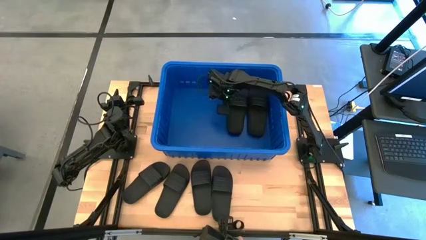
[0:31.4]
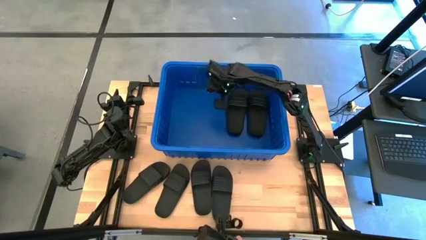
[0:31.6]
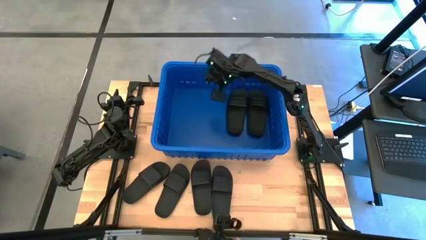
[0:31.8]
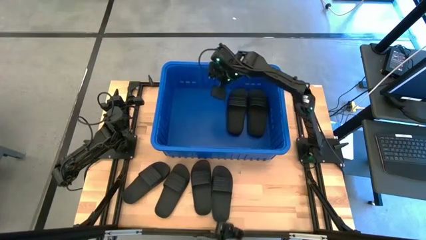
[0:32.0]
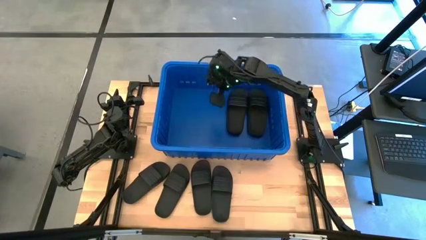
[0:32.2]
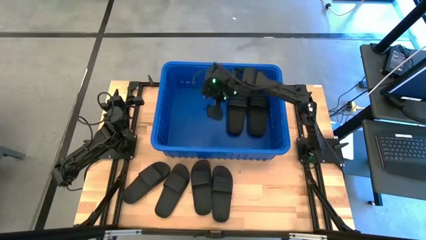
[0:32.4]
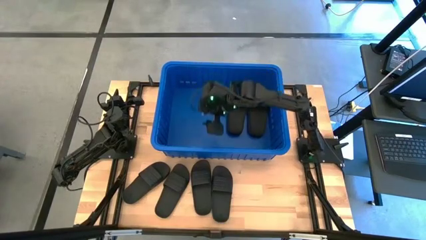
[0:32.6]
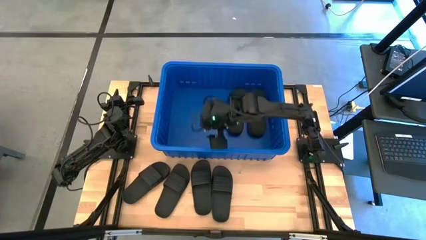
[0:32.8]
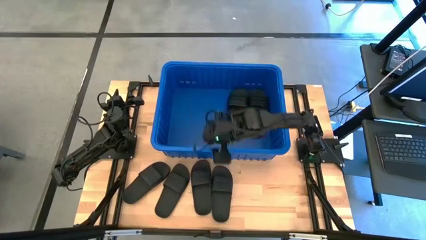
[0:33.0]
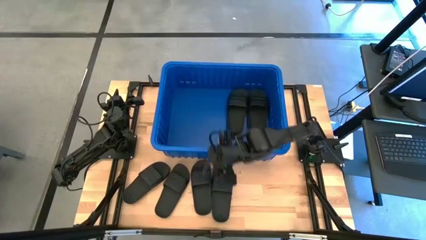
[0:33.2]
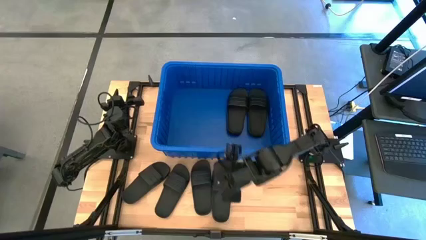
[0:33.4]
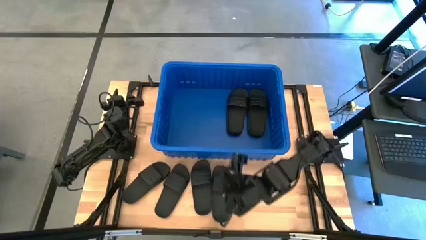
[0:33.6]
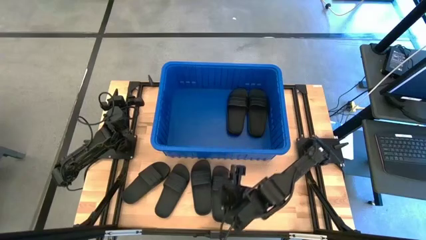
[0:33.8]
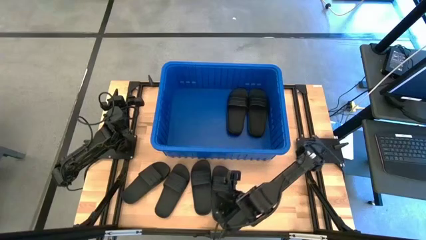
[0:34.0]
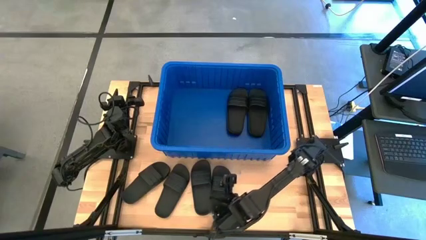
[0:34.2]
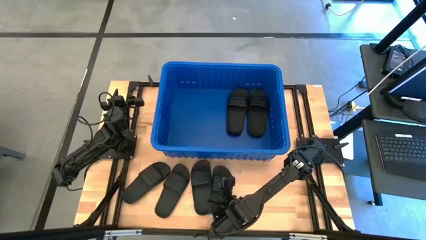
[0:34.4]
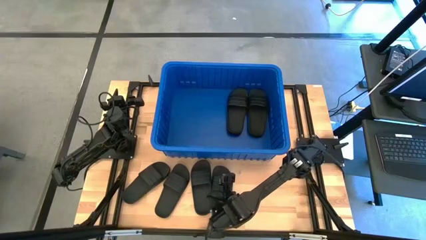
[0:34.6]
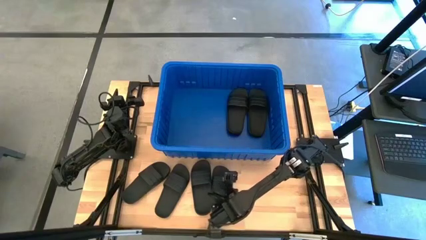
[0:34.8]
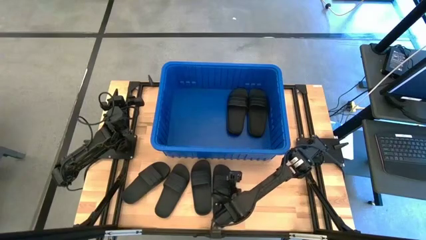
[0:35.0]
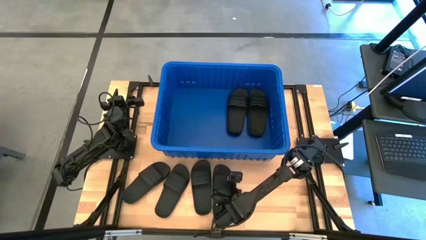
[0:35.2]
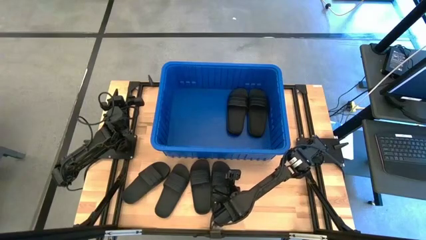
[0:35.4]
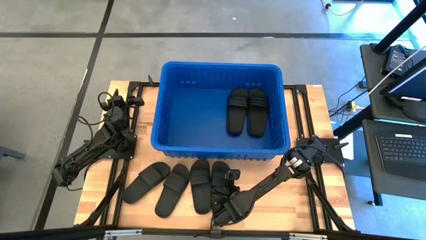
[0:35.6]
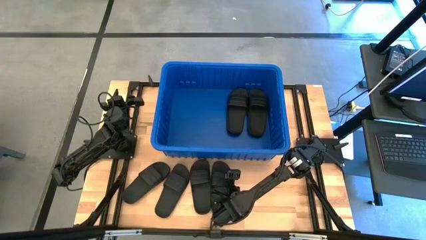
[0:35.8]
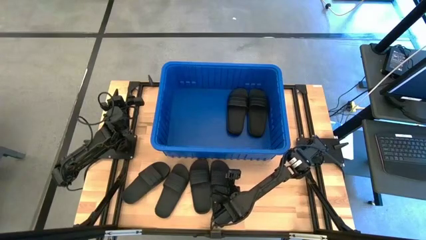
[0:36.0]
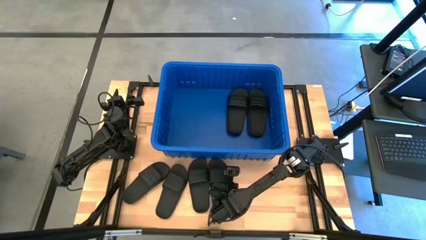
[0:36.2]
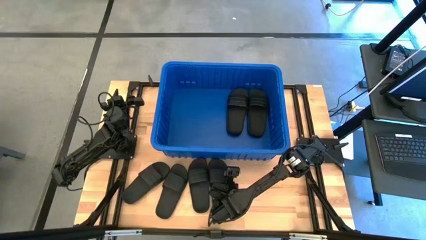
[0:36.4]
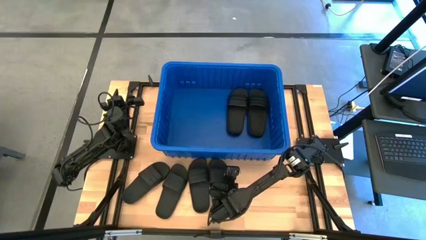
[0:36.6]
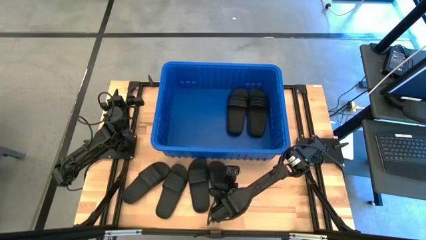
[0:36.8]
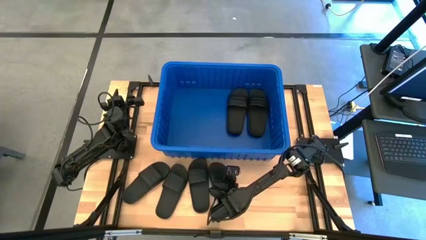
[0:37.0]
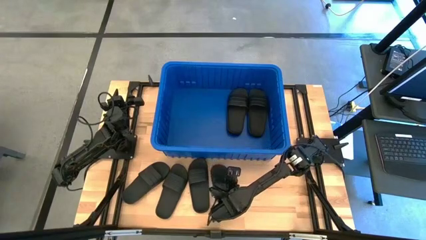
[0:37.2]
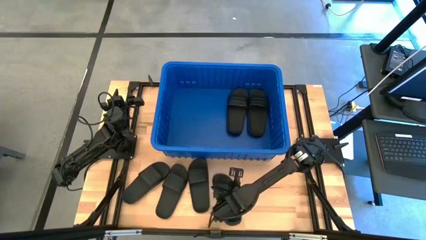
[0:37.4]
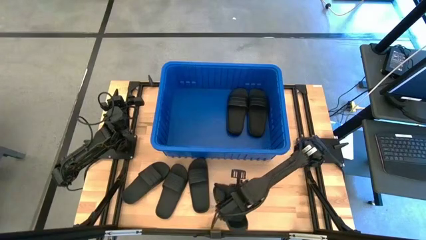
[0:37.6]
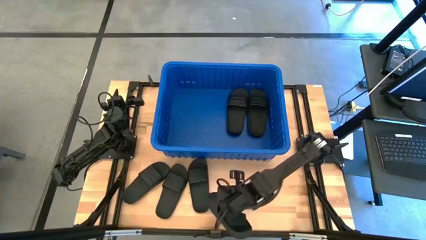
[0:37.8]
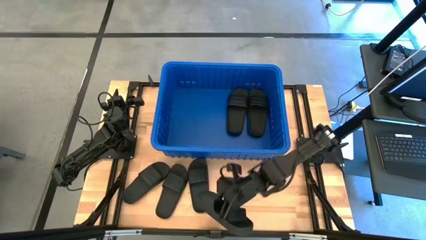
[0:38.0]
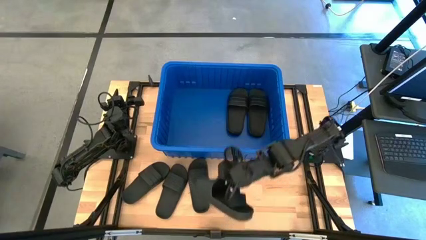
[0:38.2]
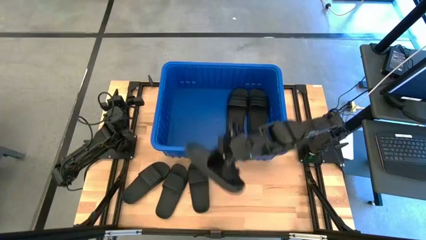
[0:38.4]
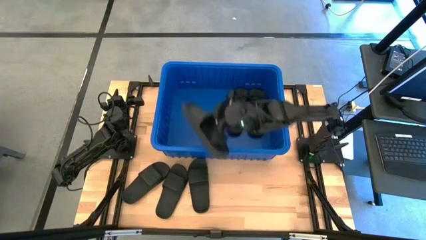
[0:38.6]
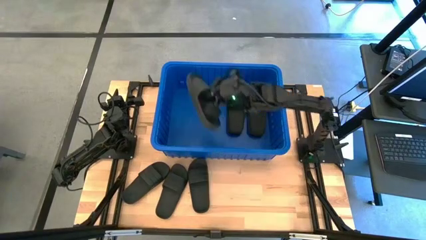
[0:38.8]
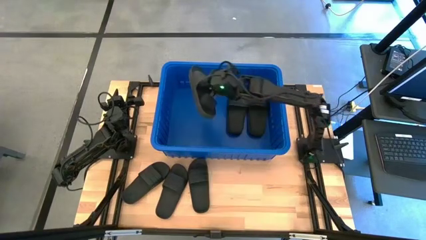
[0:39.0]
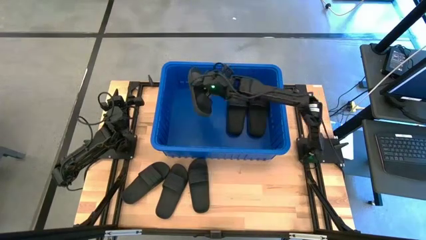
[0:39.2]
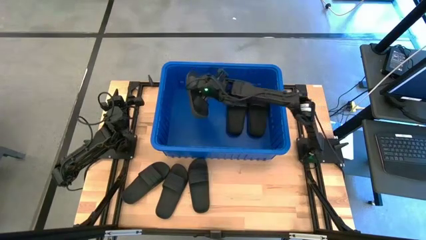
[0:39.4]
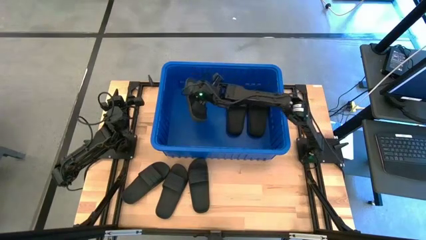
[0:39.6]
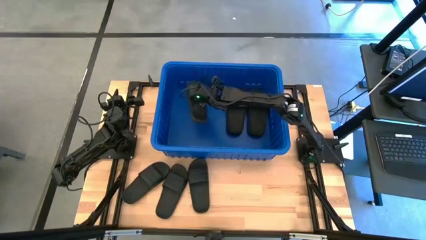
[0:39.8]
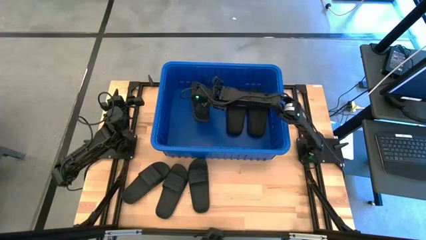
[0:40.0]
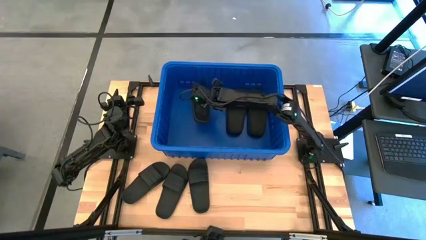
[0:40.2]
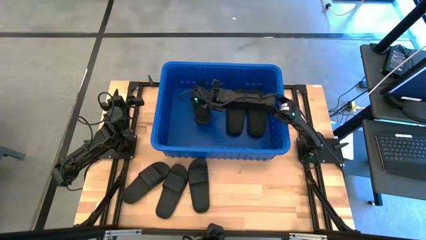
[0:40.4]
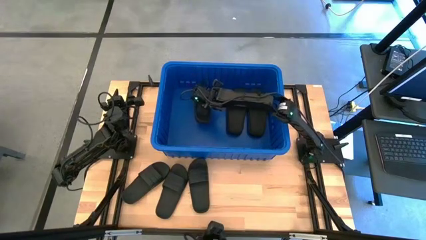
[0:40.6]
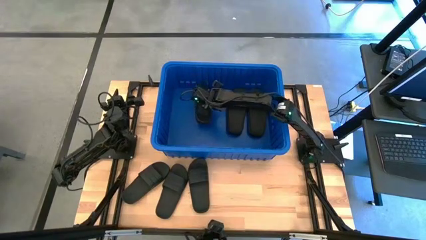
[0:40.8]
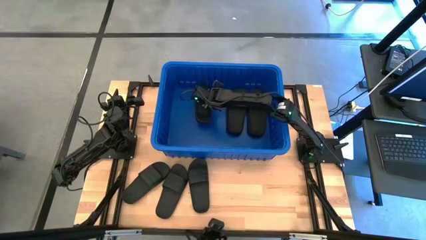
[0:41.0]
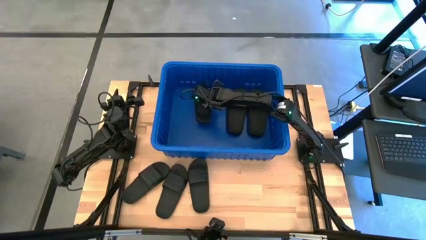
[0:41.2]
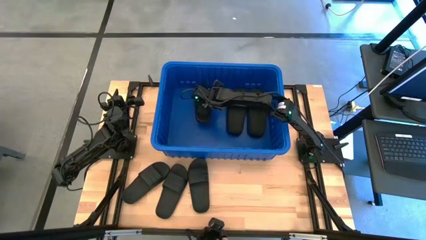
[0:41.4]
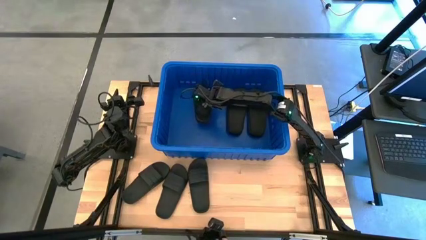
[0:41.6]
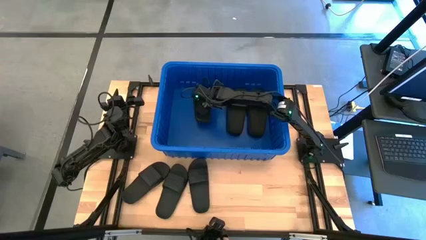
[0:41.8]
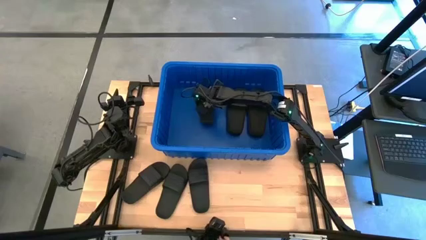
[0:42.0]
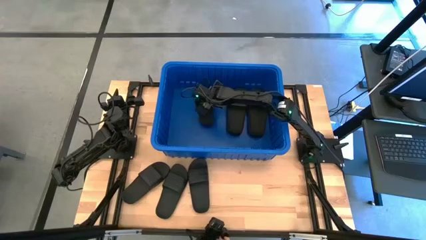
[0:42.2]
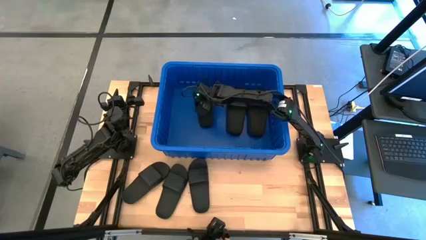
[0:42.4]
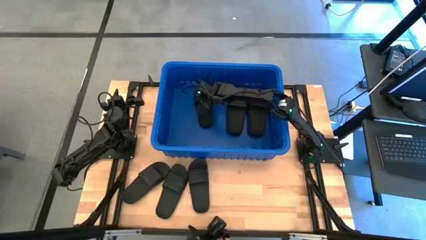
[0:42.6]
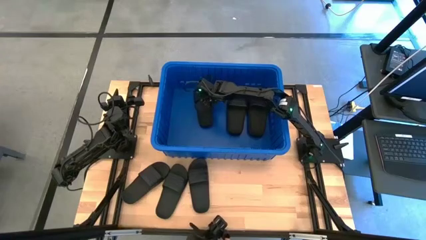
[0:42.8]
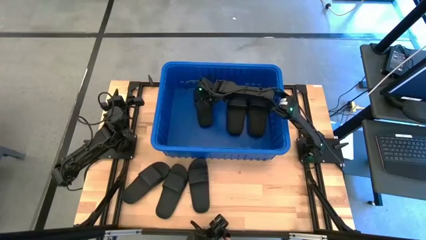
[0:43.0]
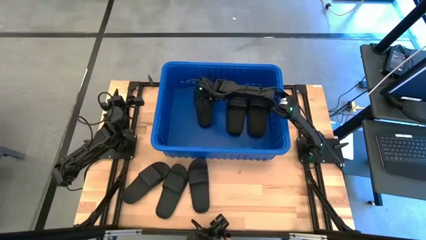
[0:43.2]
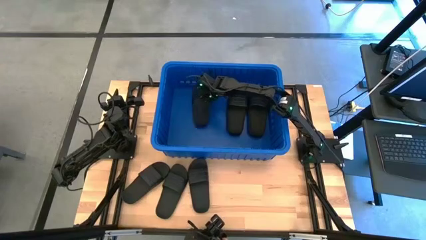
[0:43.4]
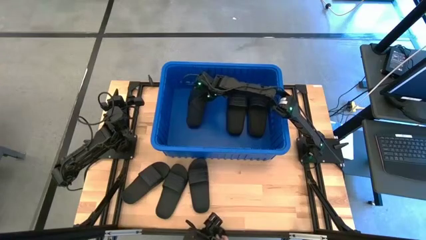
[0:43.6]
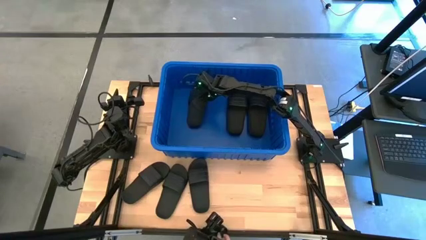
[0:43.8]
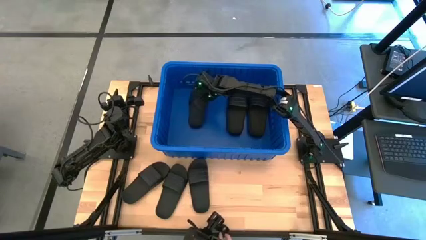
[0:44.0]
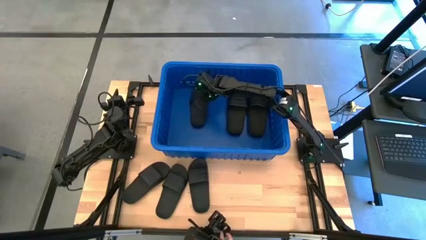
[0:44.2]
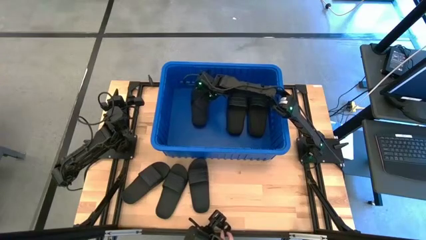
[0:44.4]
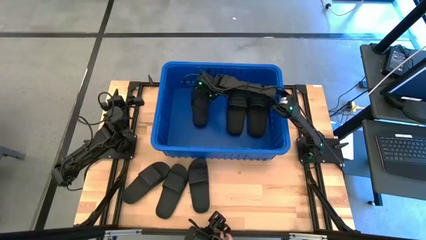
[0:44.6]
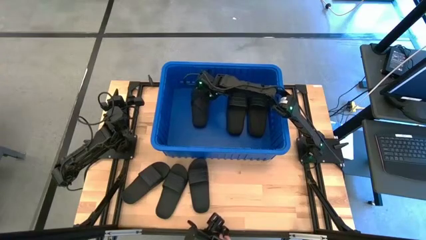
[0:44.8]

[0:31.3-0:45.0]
Task: Pick and place slides into bin
Put the black slide in the blue bin
